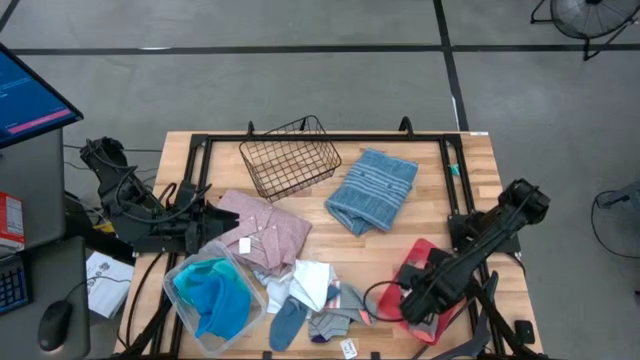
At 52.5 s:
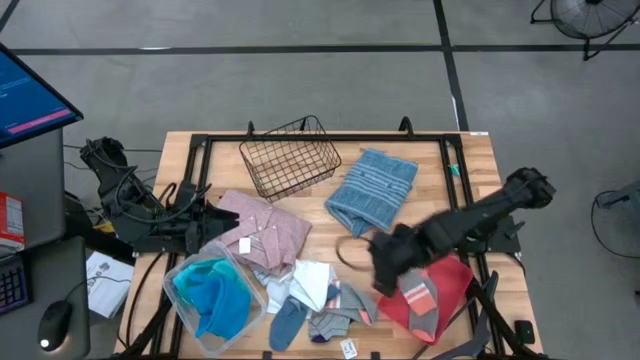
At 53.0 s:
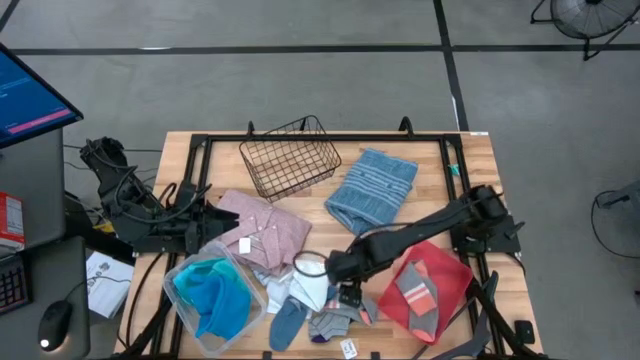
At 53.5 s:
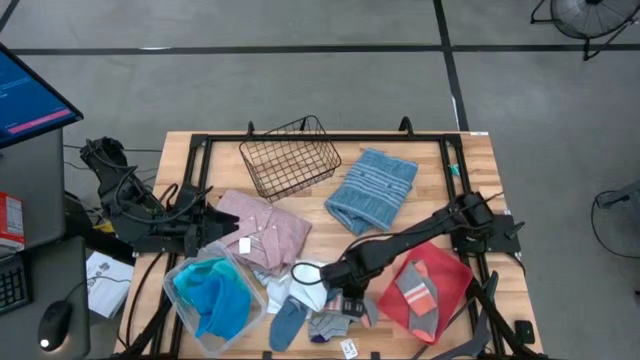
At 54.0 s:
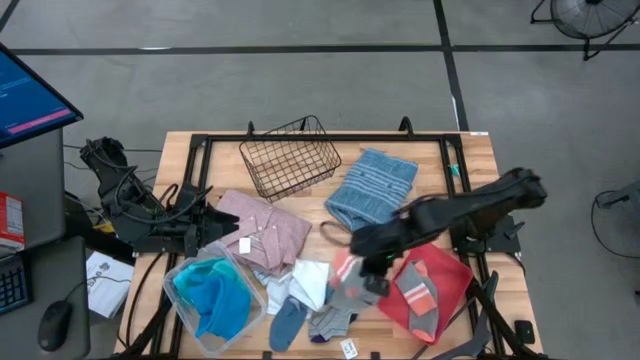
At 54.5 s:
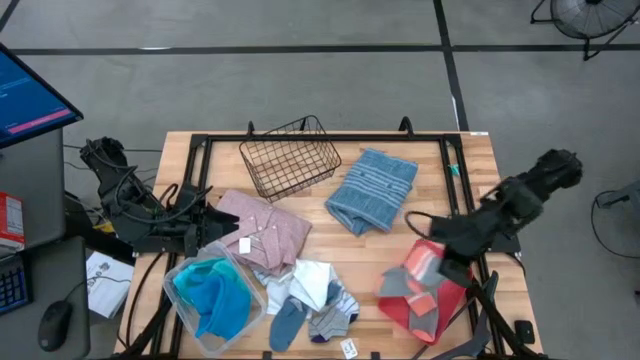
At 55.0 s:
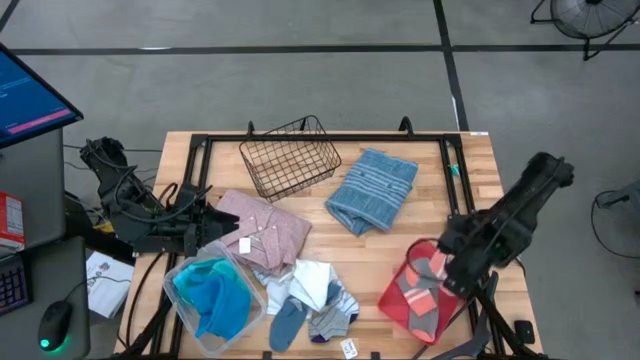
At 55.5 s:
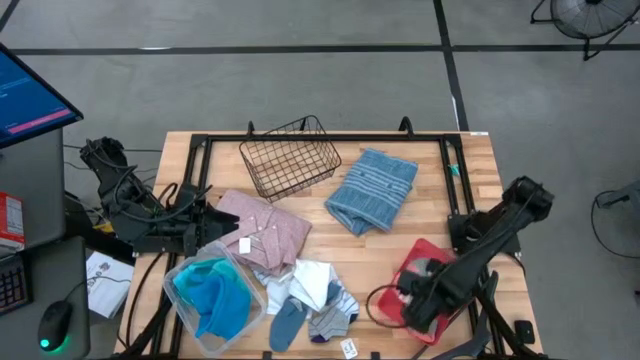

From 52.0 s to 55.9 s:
Task: Pick & Place Cloths
Put the gray patterned sock into the red bin

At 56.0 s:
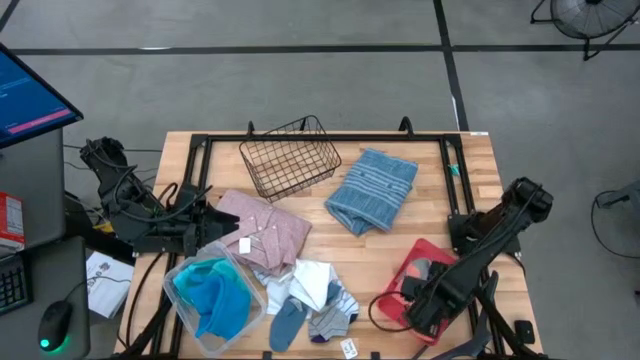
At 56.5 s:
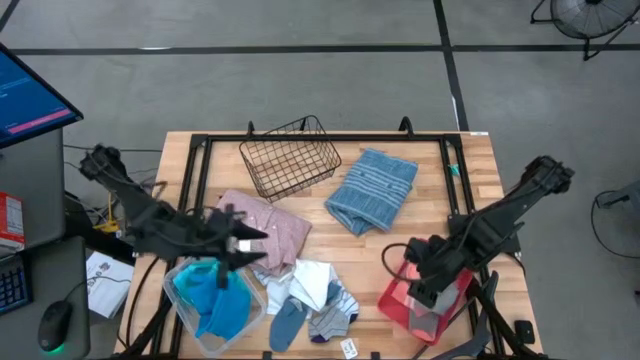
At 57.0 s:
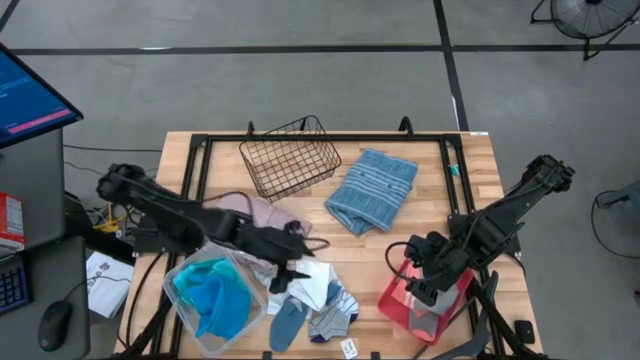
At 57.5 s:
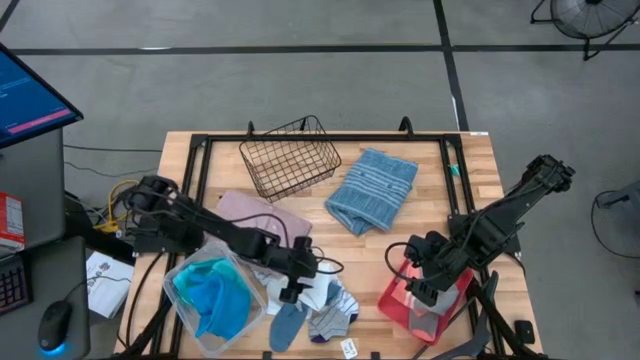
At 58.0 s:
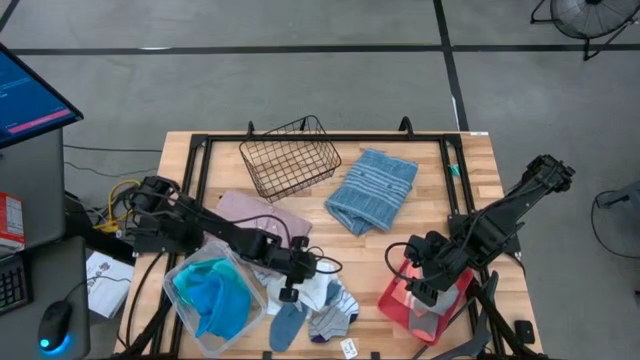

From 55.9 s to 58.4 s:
Put the white shorts into the transparent bin

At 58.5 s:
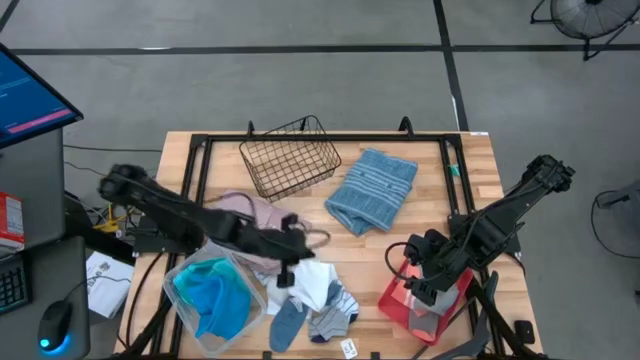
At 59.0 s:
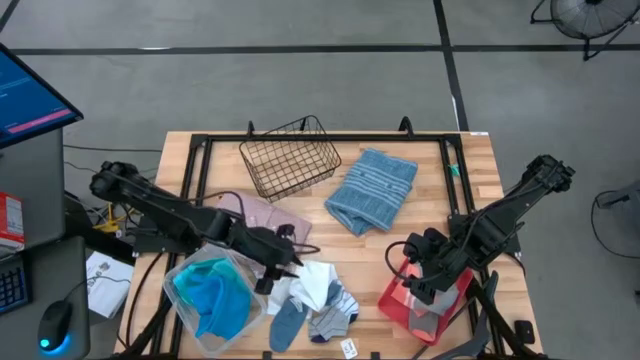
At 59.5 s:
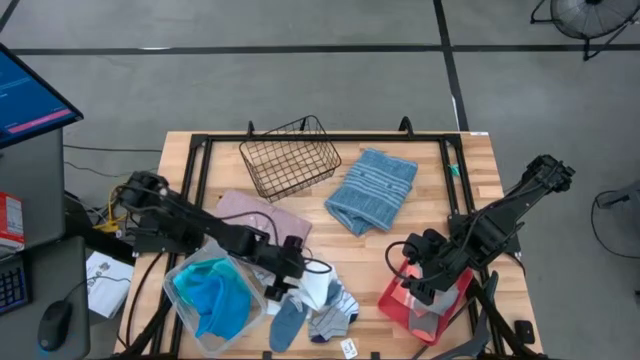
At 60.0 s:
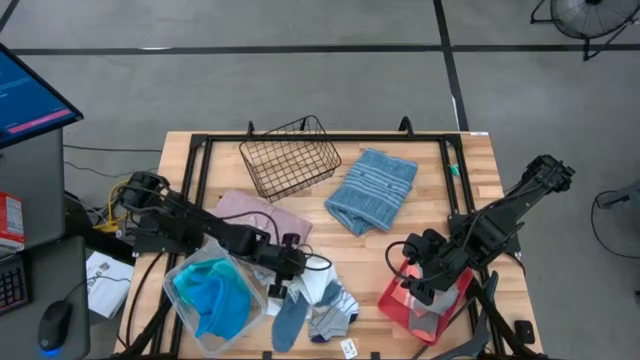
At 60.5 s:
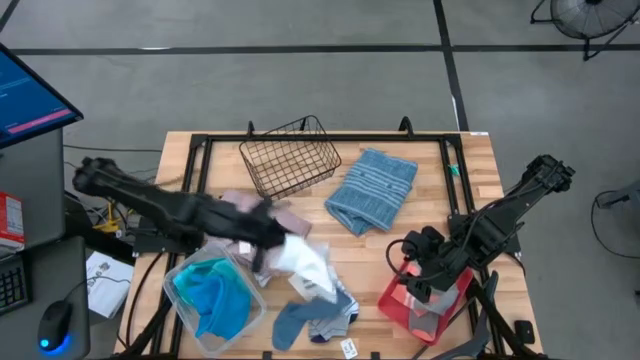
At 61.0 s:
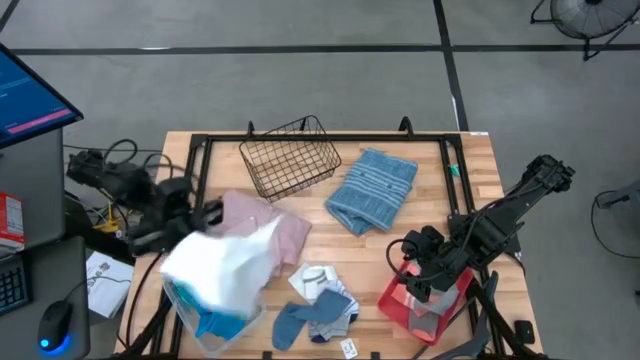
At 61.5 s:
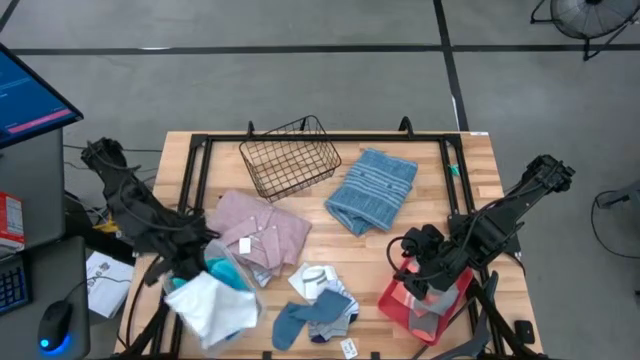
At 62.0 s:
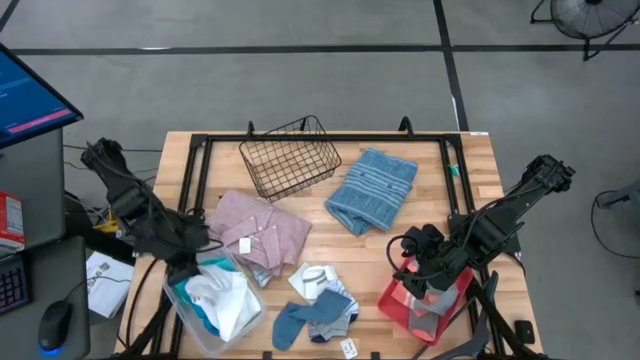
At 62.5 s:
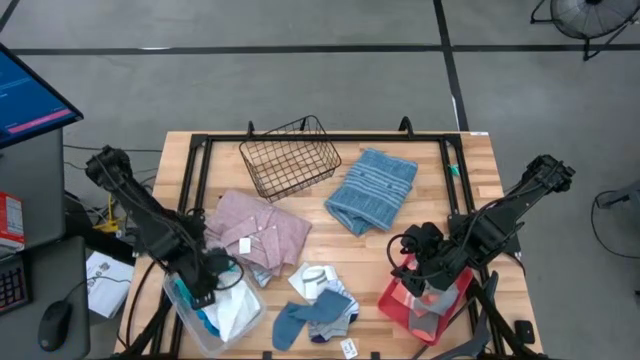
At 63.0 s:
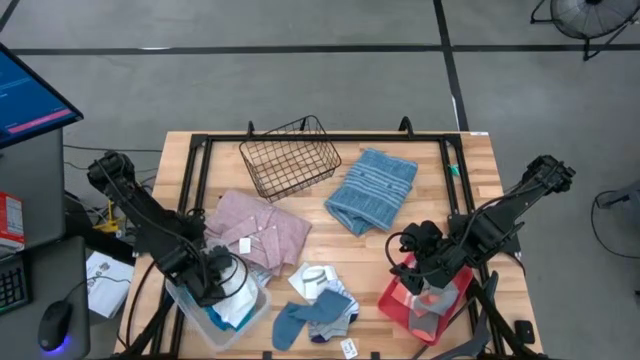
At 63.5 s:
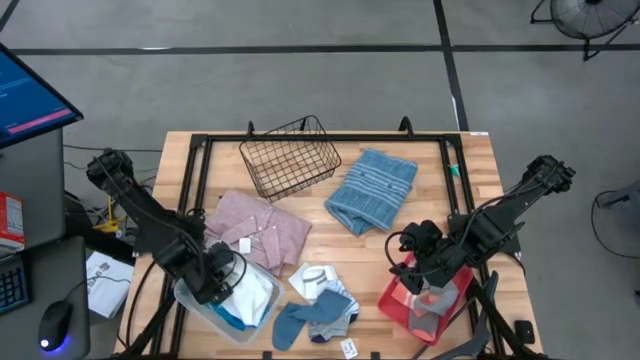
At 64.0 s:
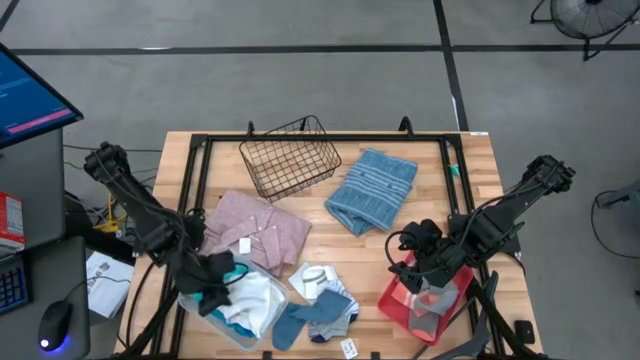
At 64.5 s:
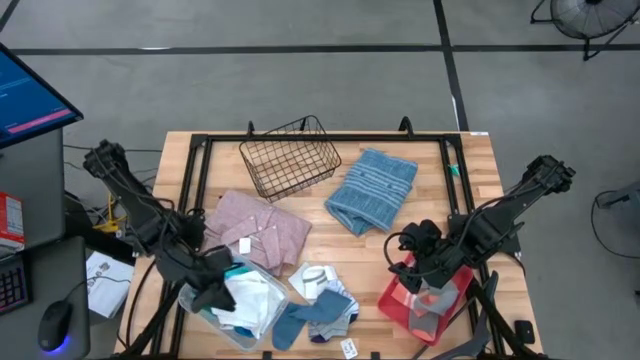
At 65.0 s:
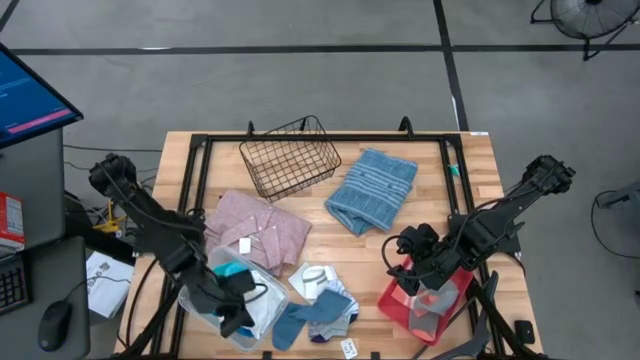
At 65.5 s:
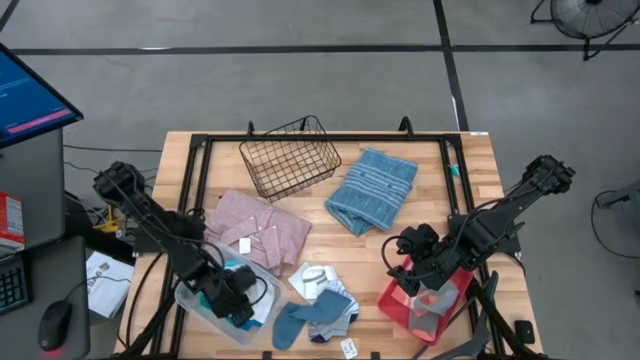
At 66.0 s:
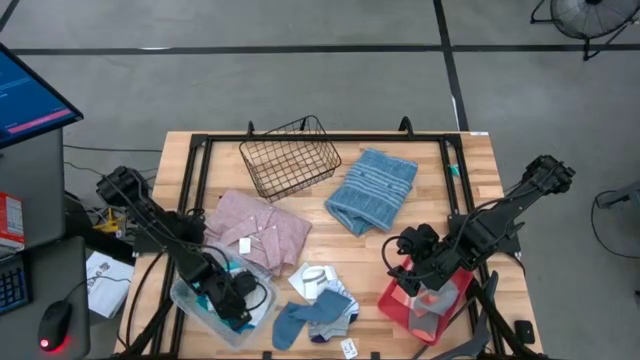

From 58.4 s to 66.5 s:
Put the white shorts into the transparent bin

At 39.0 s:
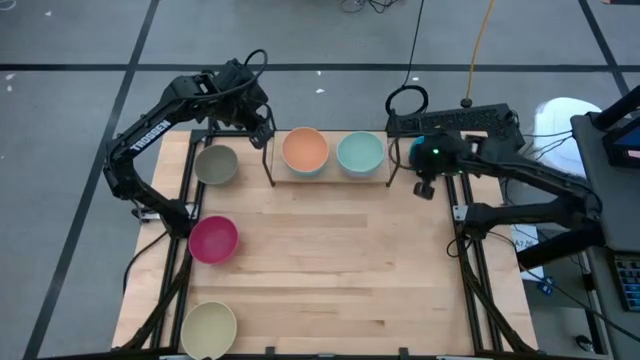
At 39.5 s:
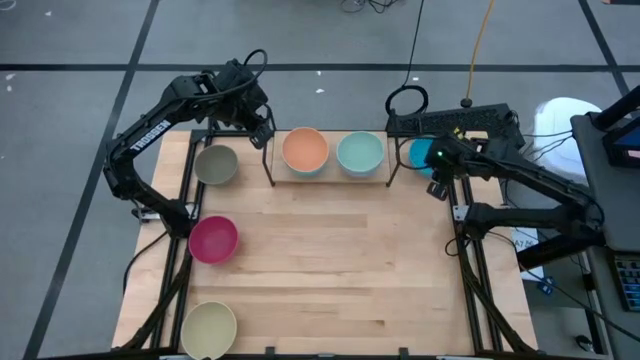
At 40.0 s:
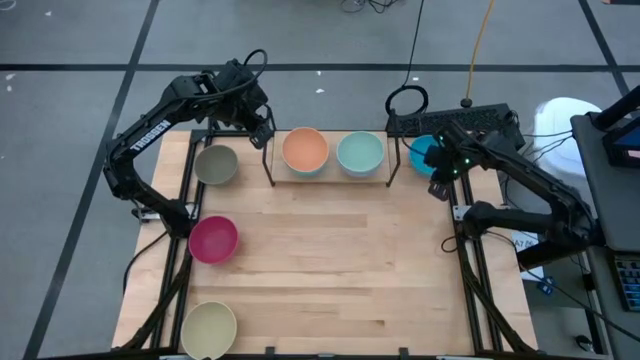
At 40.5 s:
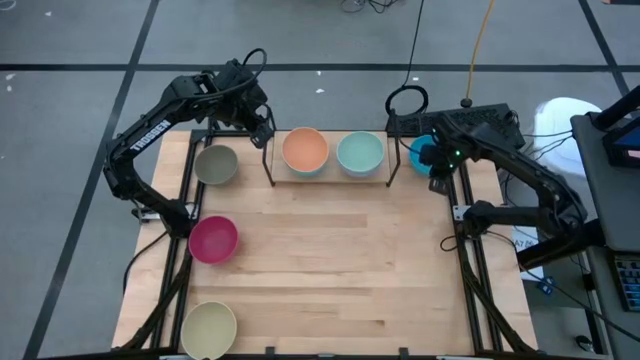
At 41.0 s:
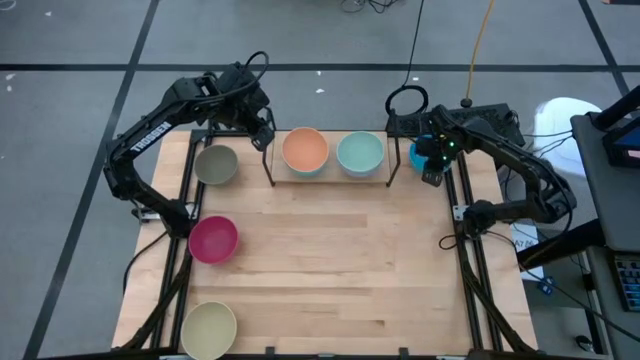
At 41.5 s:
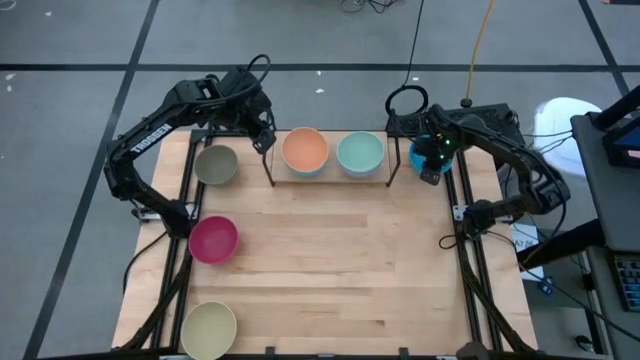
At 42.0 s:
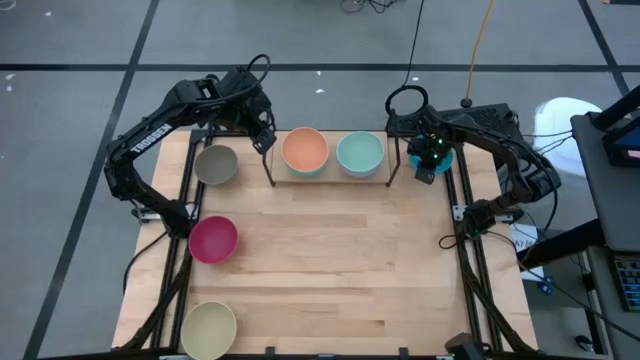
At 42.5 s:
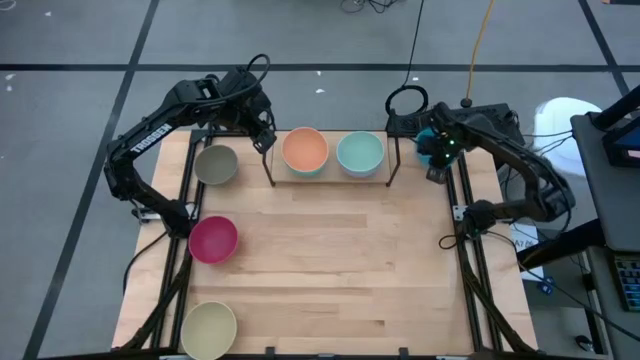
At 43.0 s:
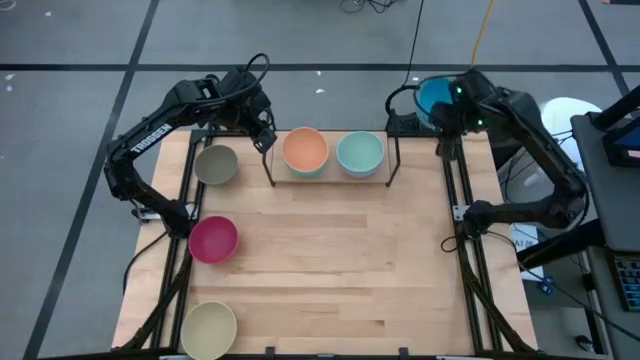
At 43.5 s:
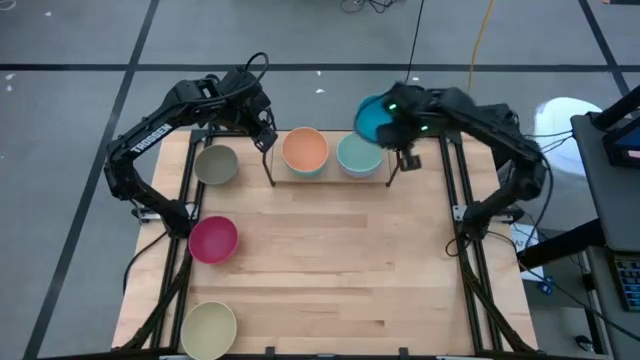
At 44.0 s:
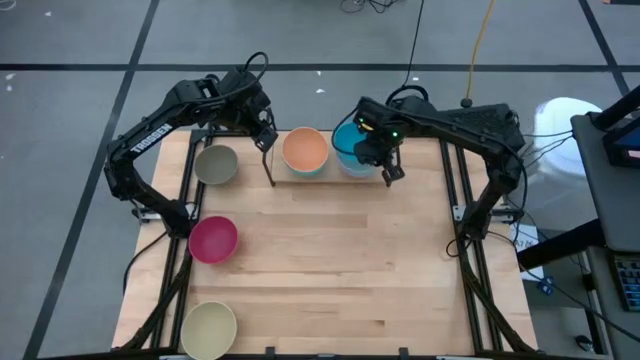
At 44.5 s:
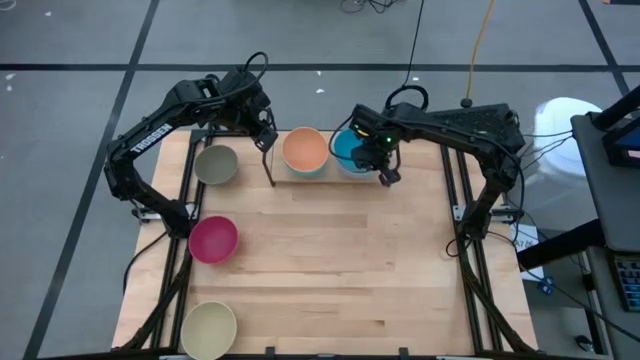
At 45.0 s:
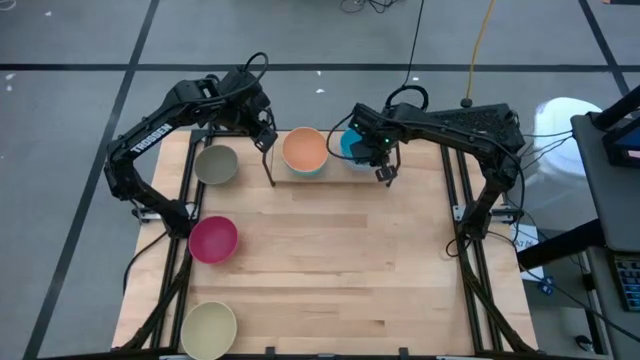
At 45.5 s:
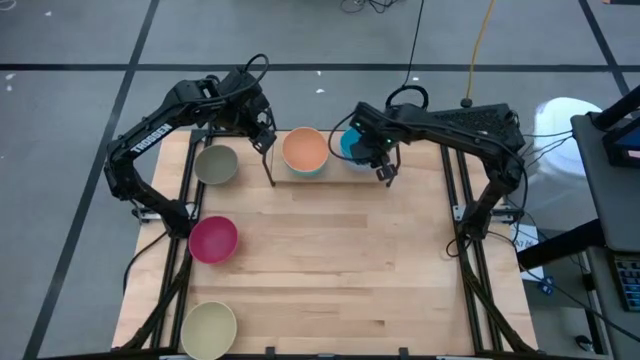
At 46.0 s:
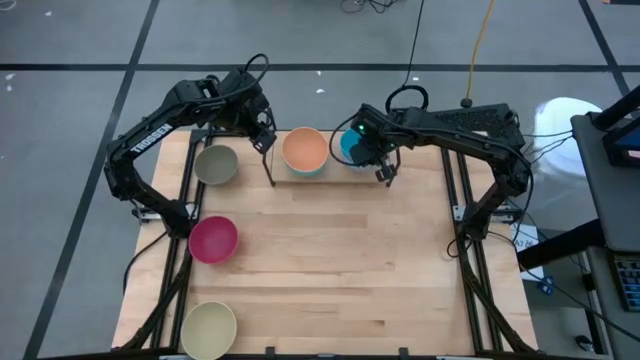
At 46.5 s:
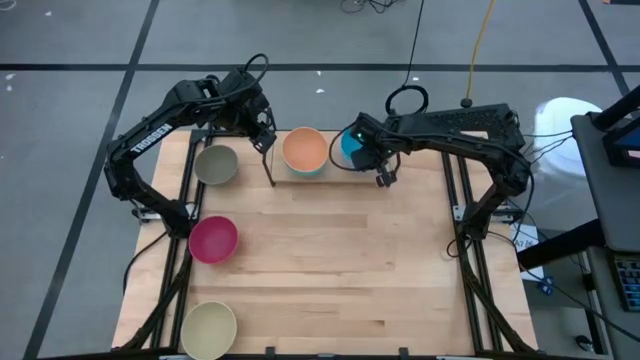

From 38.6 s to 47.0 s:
Task: Place and stack bowls onto a shelf
Stack the blue bowl on top of the green bowl on the shelf
